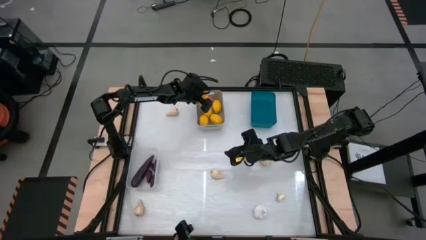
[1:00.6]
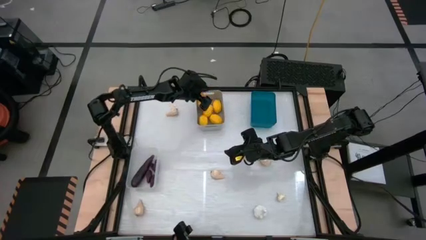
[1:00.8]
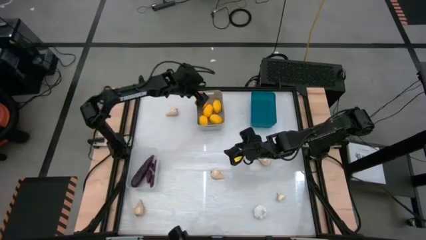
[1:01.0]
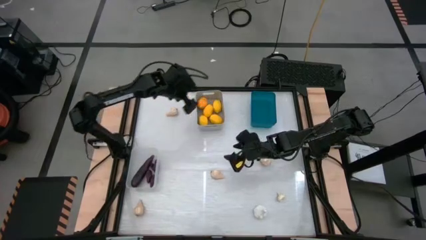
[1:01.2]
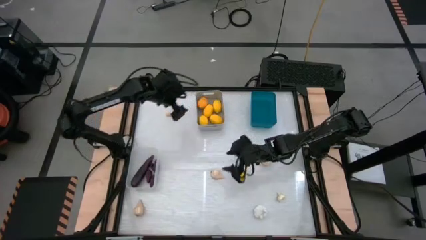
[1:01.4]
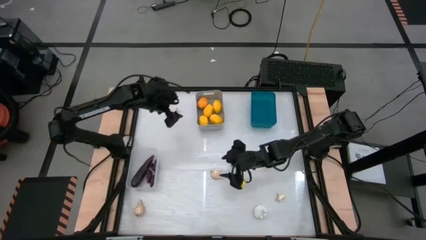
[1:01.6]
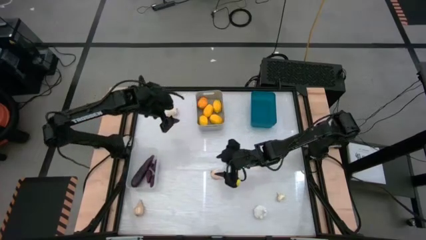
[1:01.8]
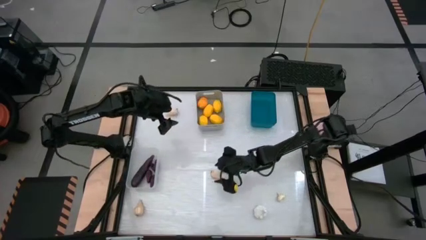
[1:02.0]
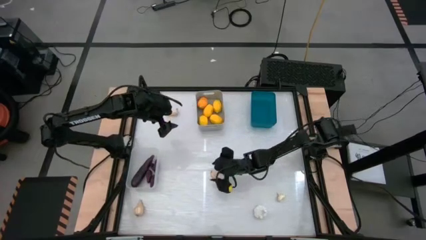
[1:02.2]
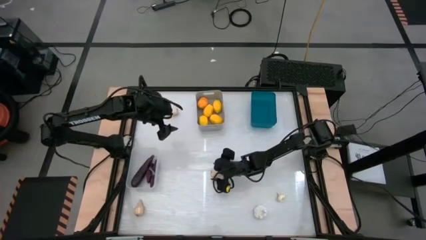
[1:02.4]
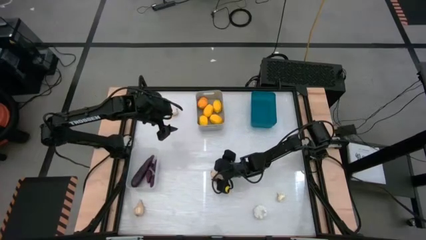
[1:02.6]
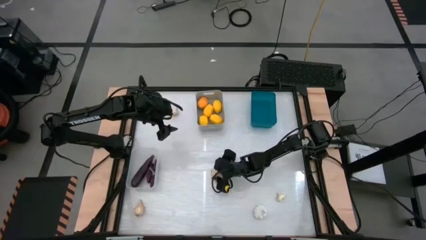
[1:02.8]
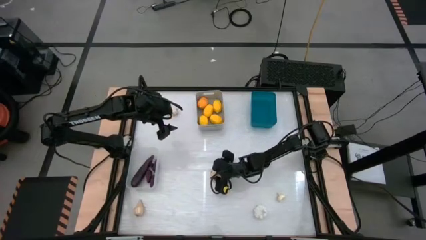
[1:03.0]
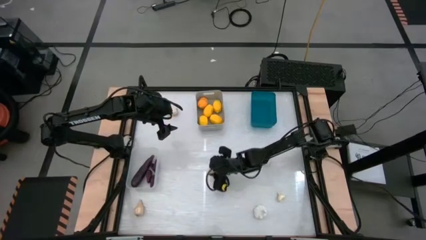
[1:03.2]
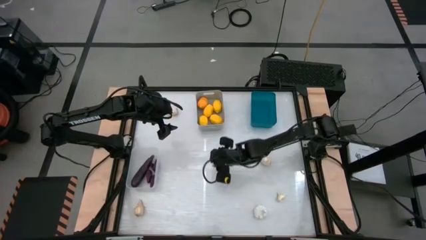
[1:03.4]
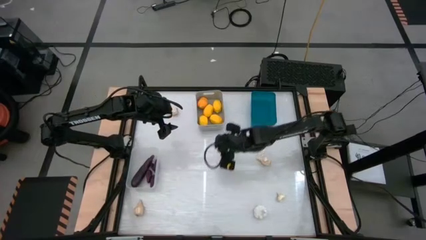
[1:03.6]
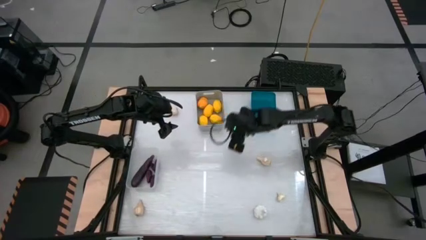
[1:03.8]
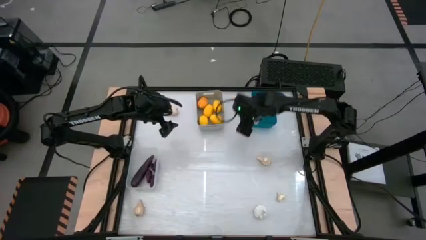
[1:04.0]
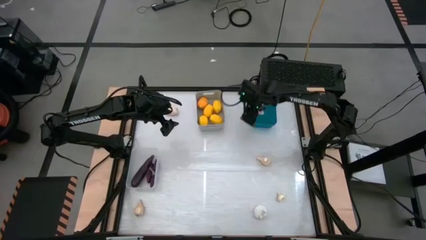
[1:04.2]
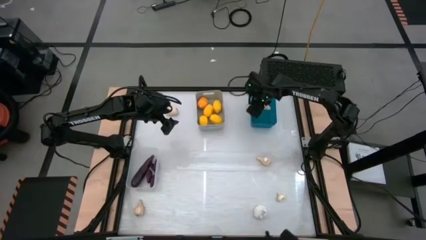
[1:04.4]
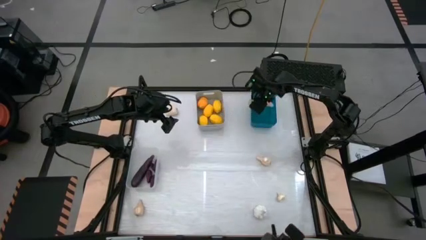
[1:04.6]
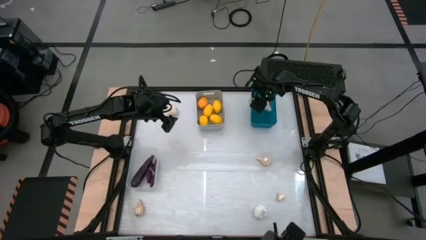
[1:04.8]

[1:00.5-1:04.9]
Task: Sort produce into baskets
Put the white garlic into the blue bin

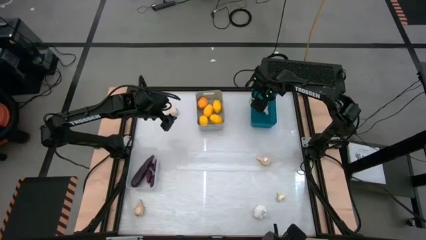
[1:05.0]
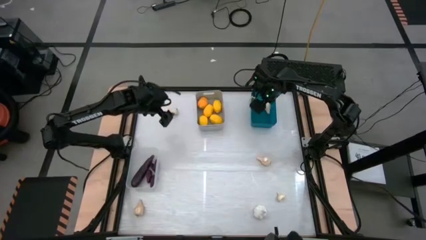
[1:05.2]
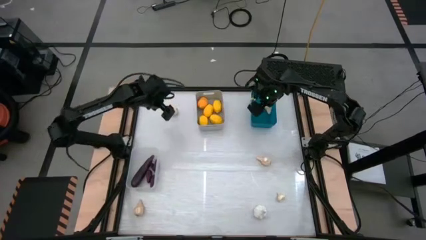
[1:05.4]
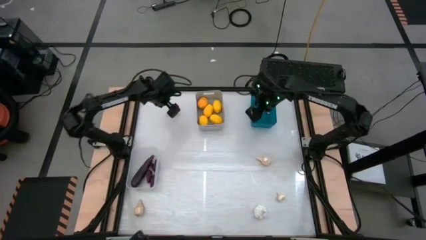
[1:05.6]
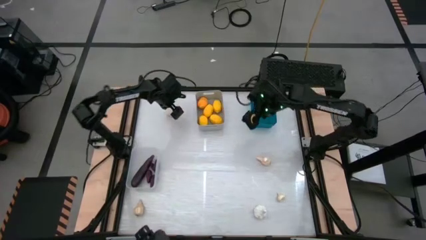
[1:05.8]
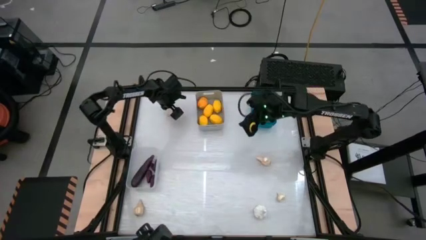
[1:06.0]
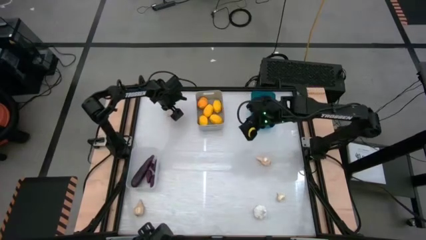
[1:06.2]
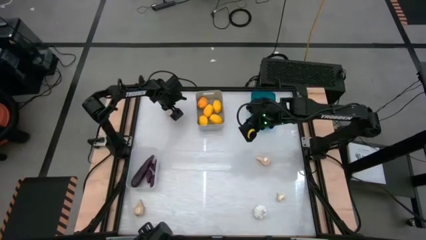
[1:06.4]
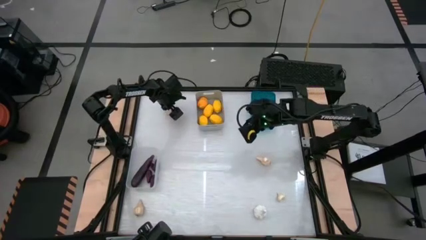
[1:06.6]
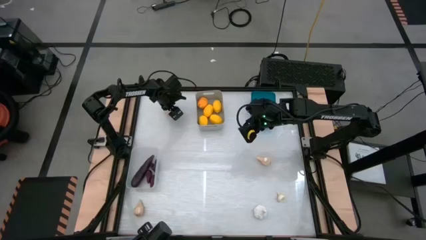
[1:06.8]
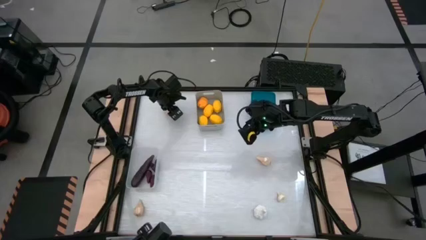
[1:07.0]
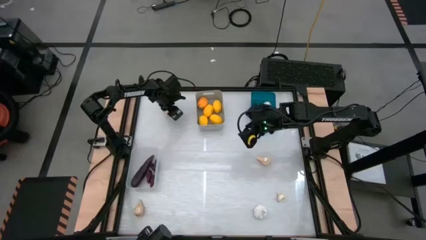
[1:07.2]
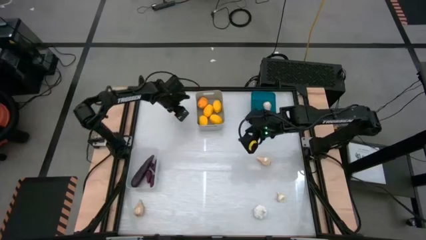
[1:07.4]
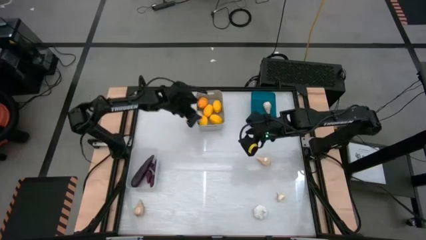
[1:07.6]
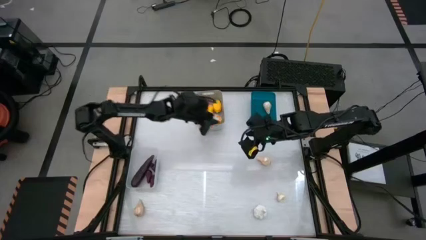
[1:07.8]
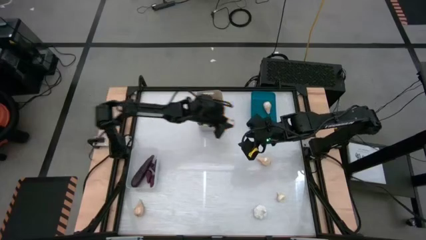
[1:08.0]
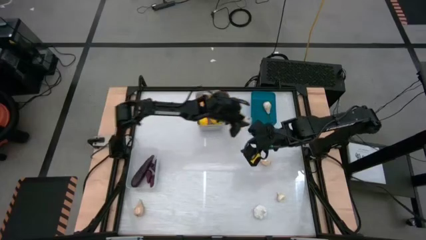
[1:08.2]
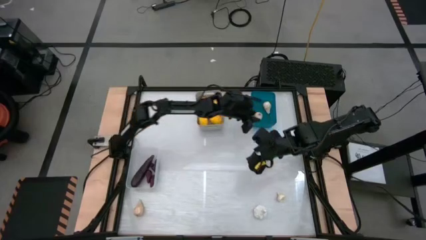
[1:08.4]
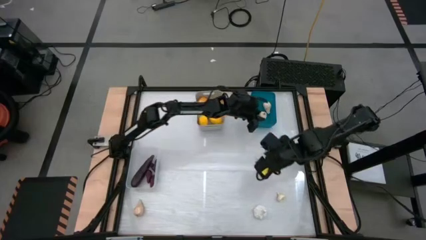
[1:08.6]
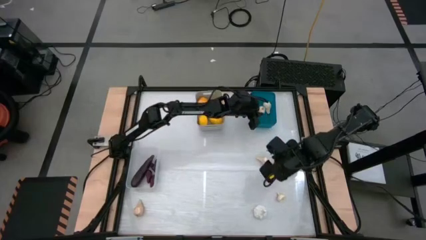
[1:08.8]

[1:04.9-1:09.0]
Put the white garlic into the blue bin

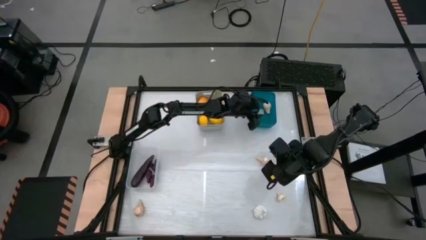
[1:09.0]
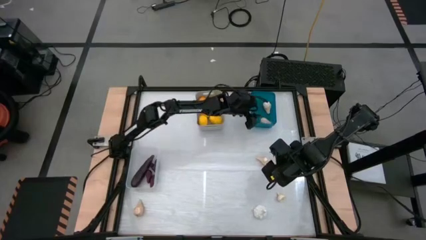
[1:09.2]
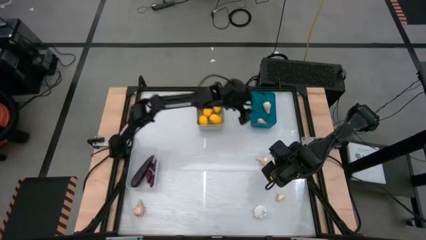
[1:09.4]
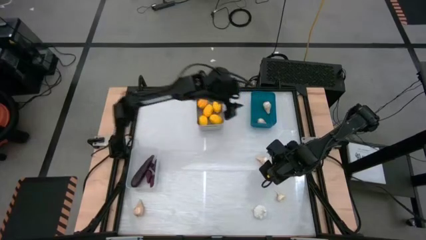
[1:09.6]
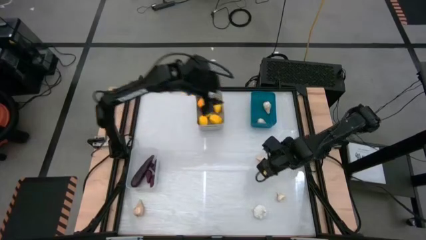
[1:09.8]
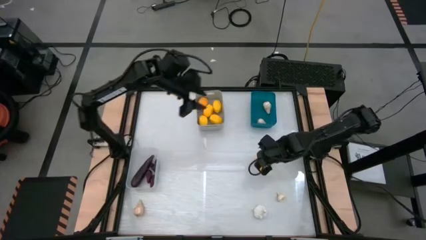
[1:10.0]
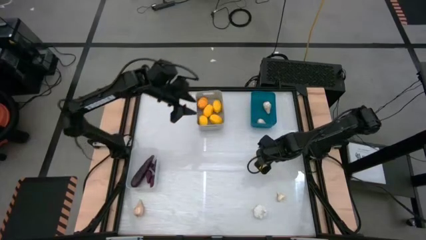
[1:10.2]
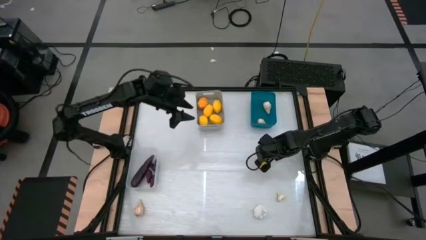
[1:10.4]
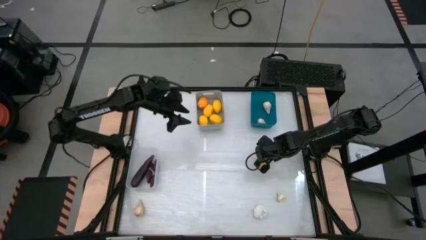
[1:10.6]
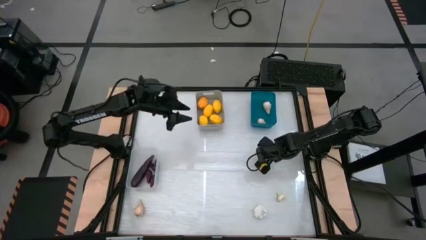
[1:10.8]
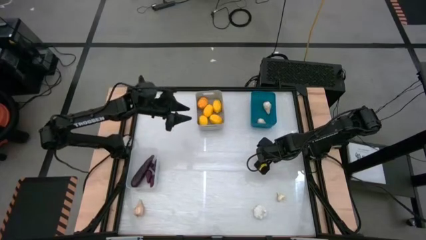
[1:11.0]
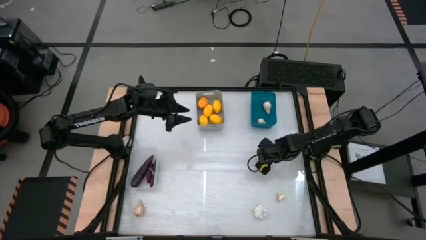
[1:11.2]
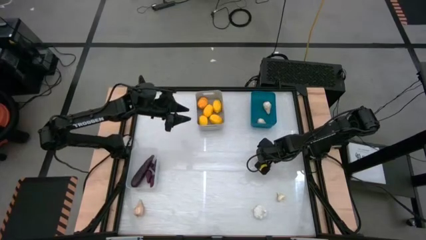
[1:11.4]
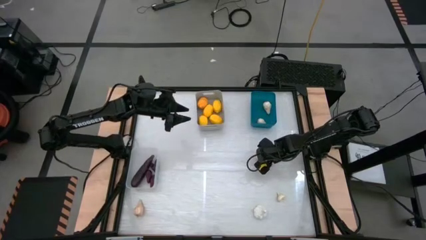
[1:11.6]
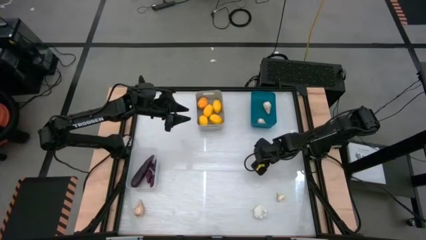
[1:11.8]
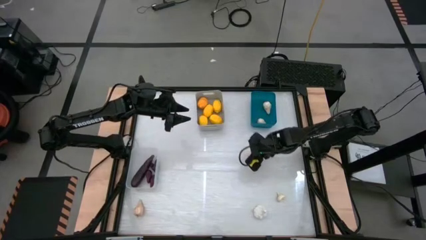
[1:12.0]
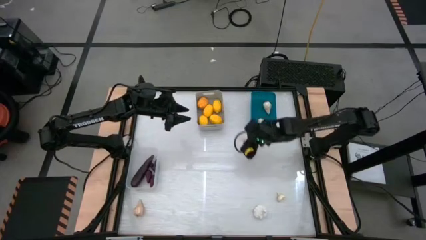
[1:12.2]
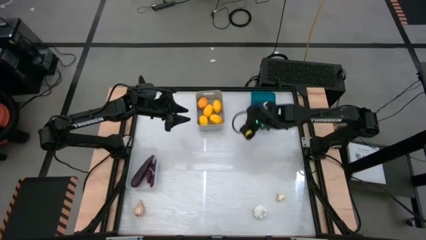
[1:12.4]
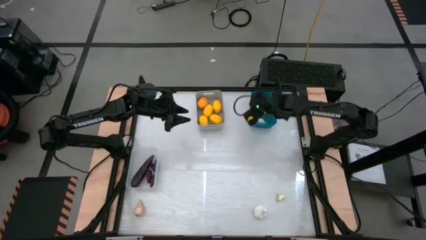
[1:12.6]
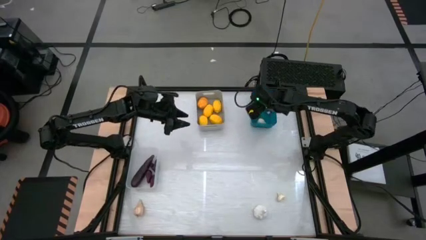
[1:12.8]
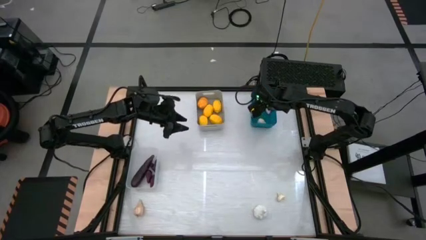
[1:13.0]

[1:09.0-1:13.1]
Put the white garlic into the blue bin

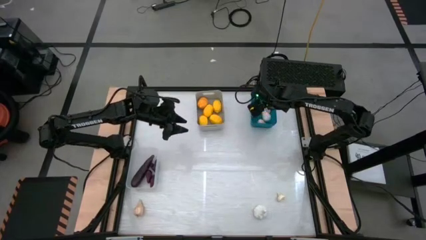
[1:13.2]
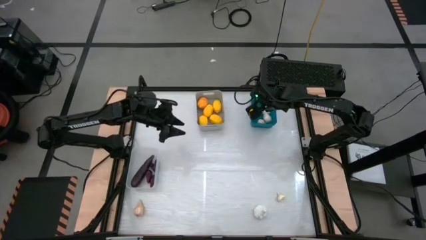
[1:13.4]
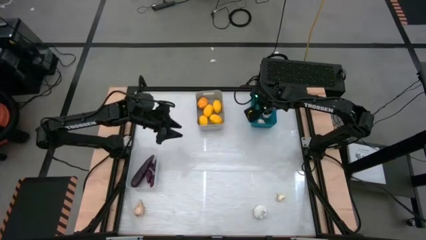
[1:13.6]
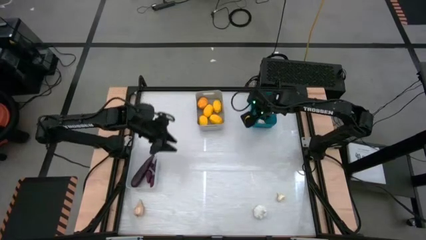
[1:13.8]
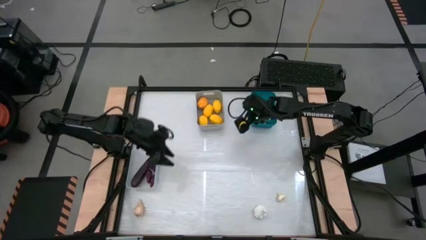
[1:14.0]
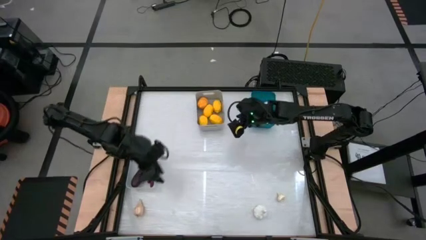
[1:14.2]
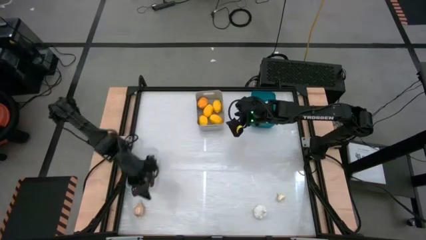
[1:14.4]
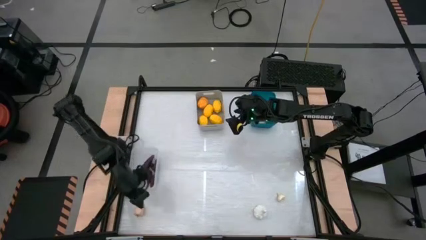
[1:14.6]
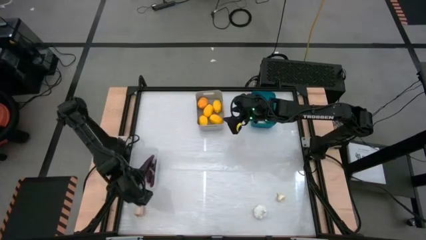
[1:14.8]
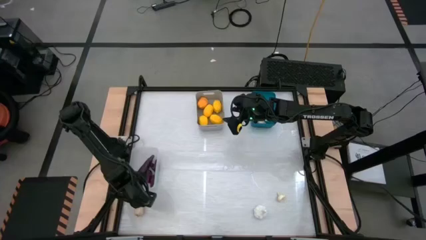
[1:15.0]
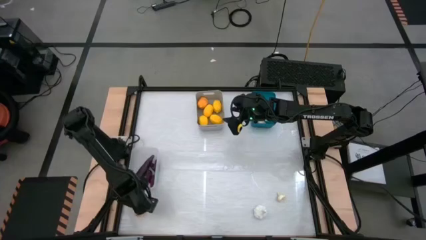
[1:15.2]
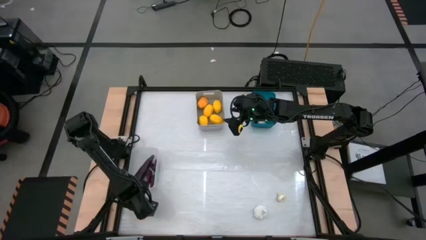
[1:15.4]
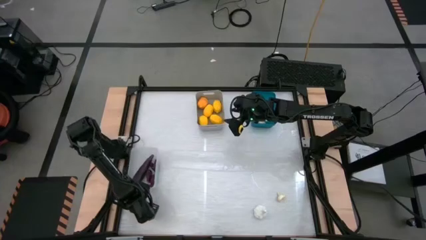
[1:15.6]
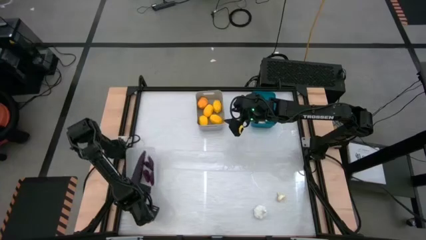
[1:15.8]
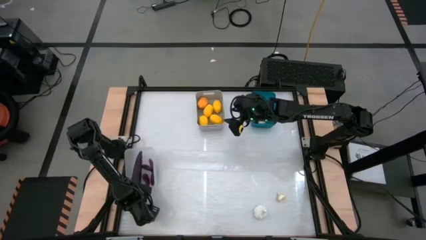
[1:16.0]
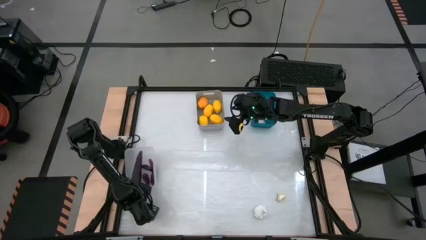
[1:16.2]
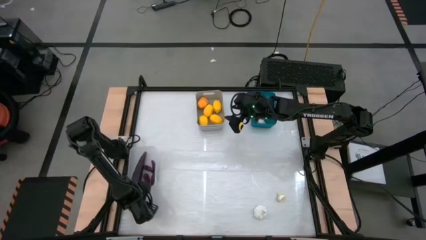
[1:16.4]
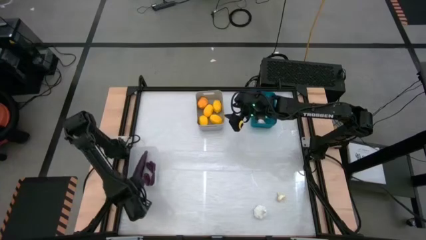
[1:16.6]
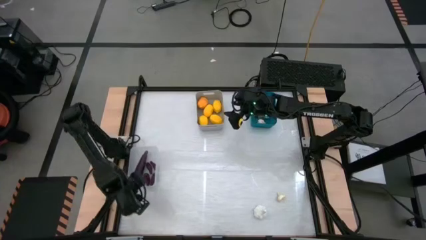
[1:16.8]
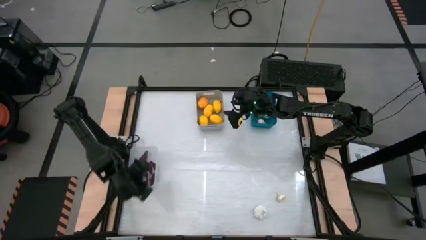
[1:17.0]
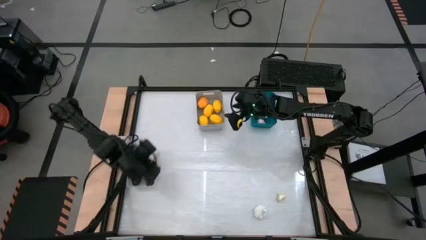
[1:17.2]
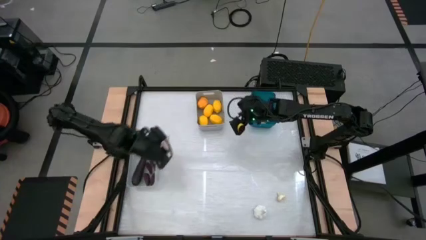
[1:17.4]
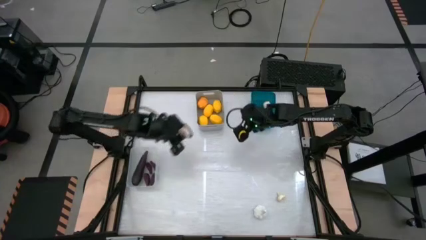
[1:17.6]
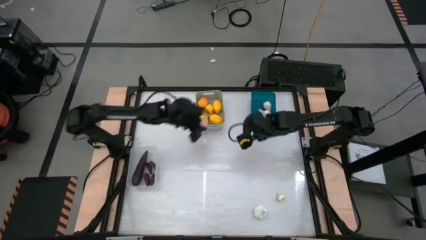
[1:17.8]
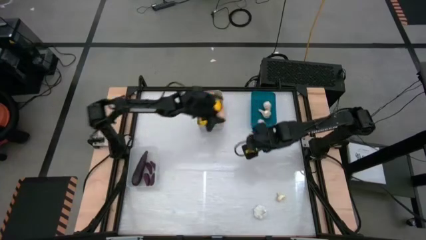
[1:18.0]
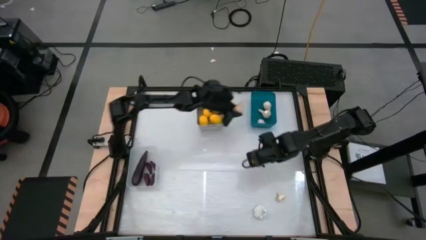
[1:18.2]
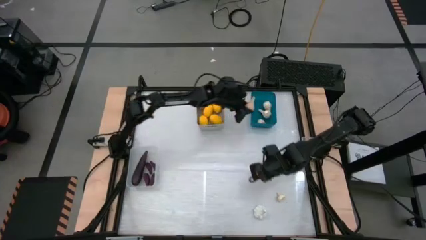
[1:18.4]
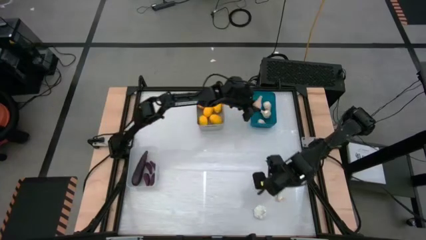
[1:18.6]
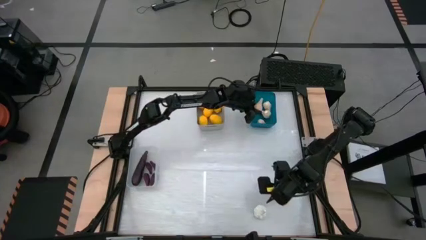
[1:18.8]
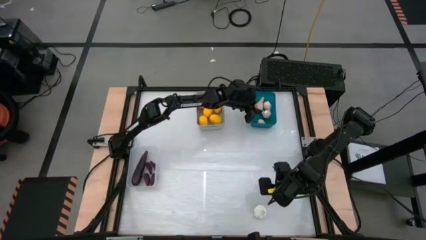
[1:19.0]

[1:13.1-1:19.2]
Put the white garlic into the blue bin
